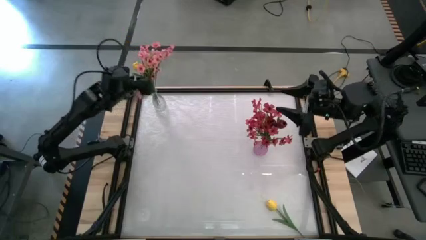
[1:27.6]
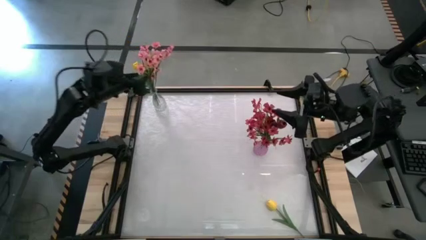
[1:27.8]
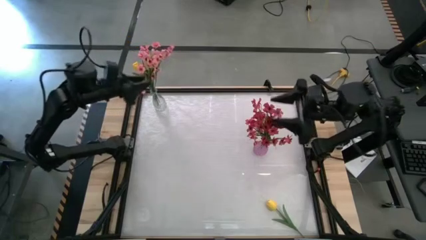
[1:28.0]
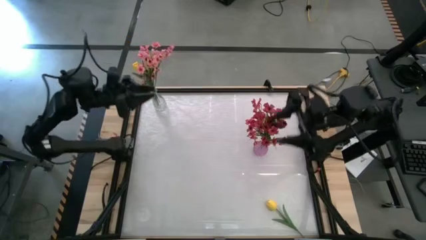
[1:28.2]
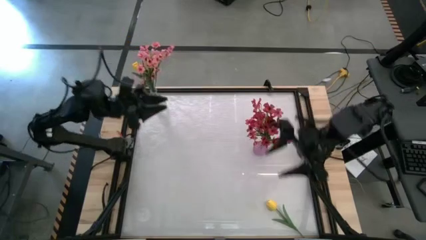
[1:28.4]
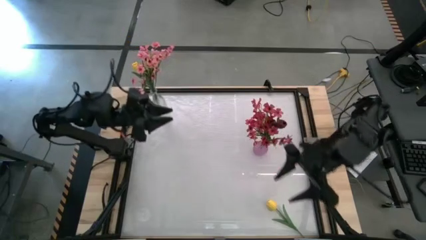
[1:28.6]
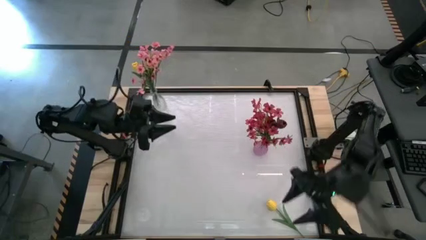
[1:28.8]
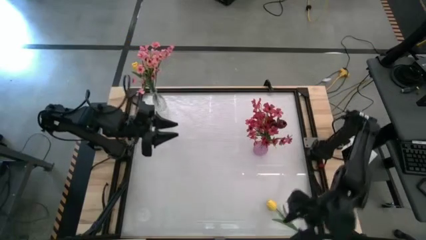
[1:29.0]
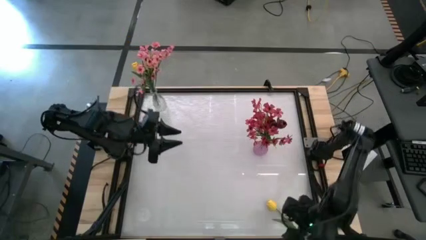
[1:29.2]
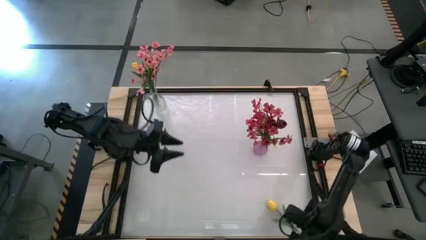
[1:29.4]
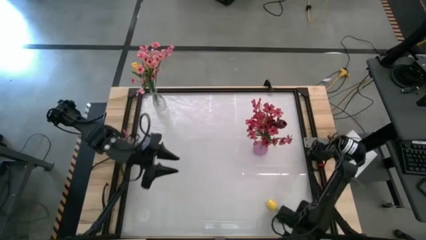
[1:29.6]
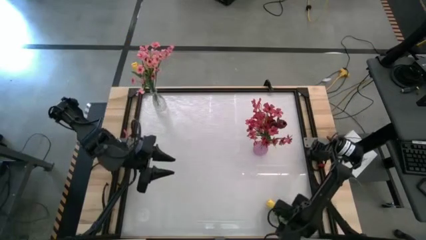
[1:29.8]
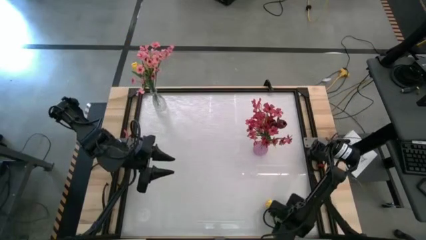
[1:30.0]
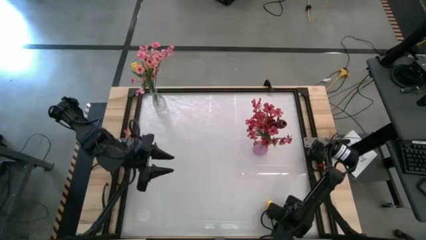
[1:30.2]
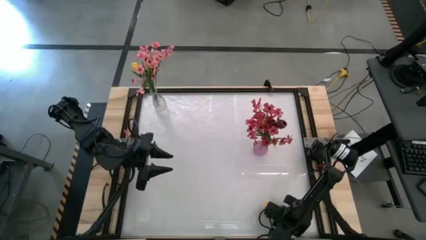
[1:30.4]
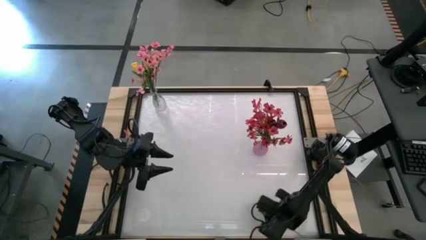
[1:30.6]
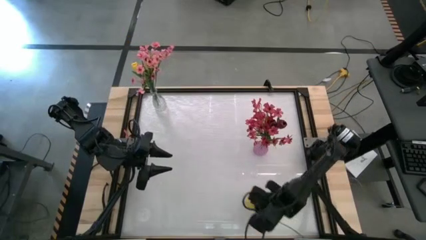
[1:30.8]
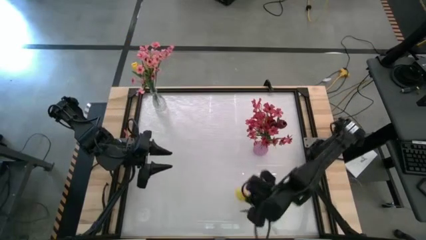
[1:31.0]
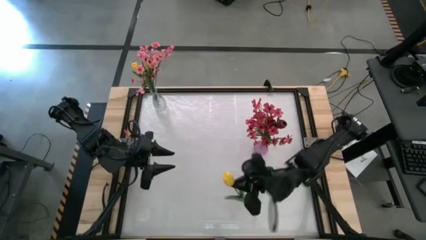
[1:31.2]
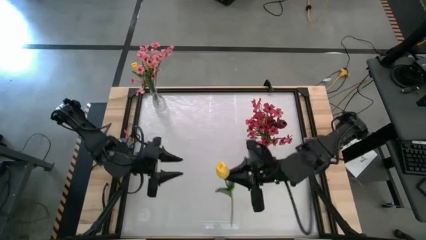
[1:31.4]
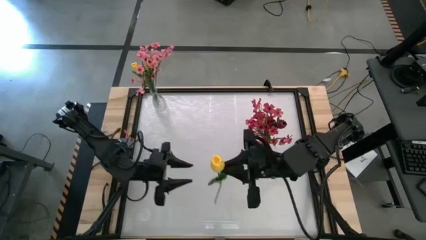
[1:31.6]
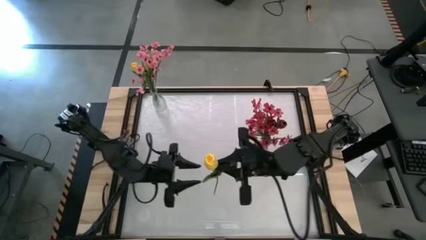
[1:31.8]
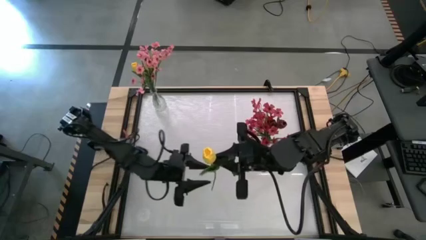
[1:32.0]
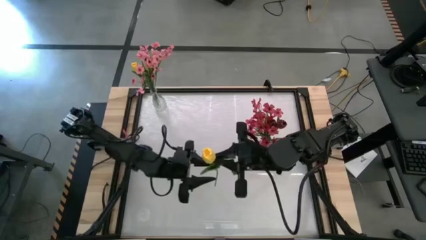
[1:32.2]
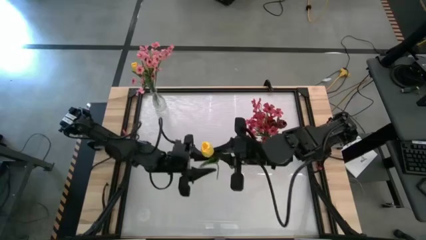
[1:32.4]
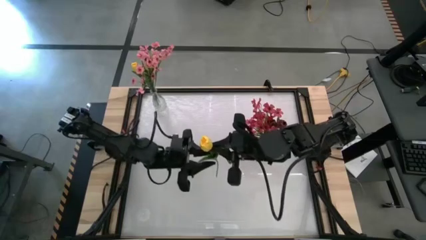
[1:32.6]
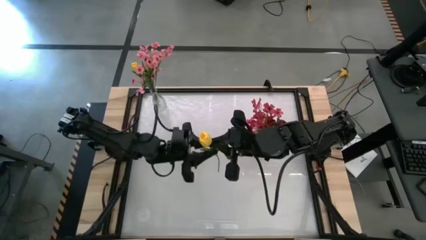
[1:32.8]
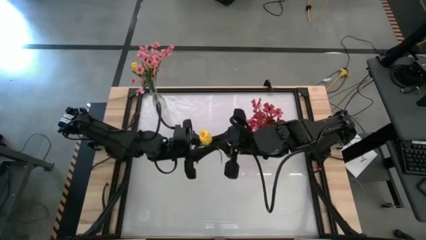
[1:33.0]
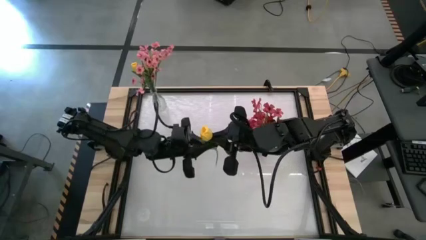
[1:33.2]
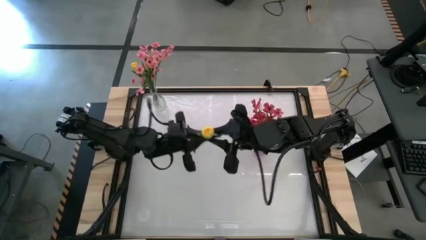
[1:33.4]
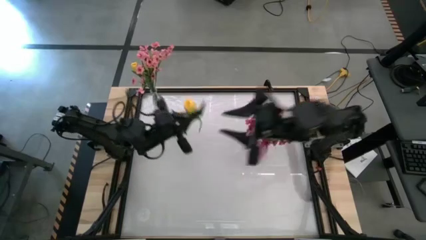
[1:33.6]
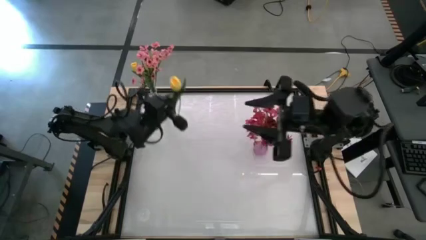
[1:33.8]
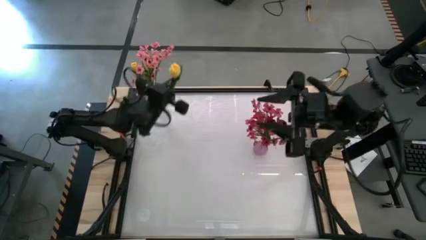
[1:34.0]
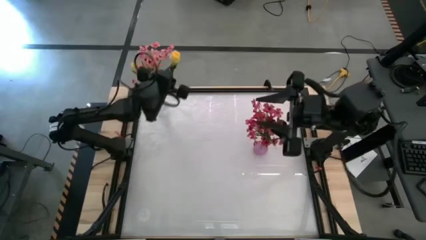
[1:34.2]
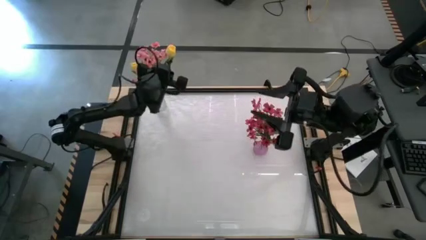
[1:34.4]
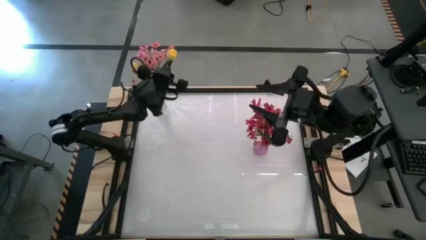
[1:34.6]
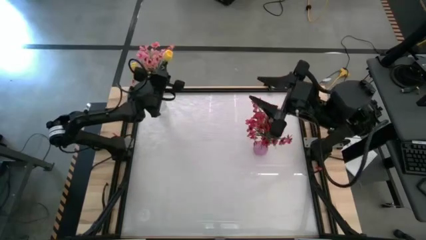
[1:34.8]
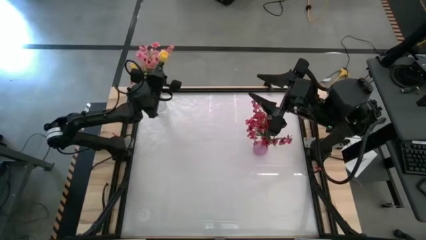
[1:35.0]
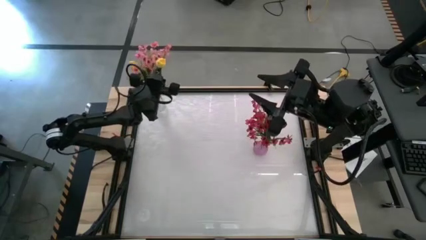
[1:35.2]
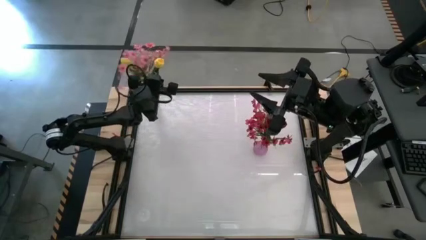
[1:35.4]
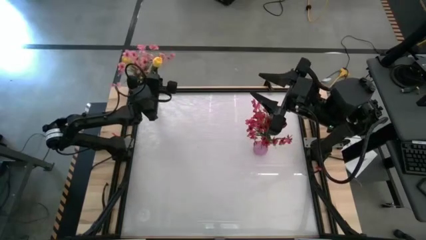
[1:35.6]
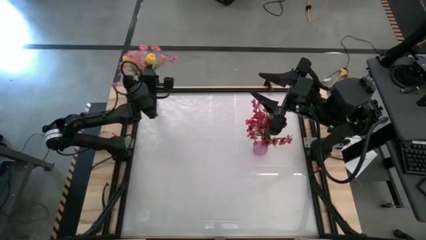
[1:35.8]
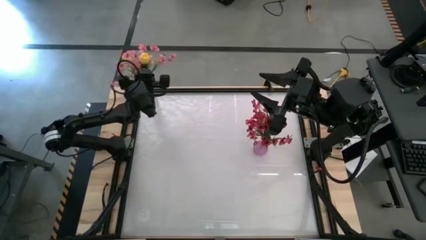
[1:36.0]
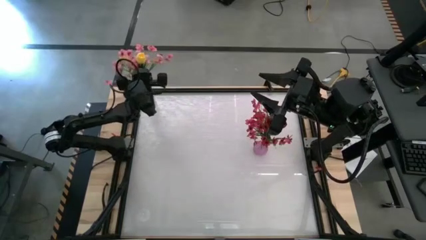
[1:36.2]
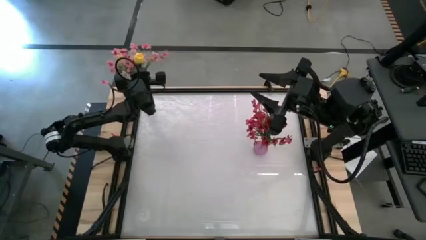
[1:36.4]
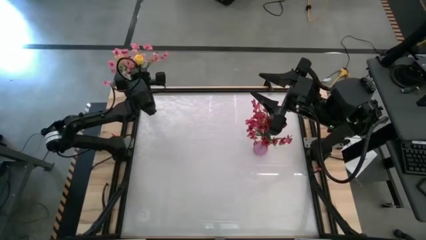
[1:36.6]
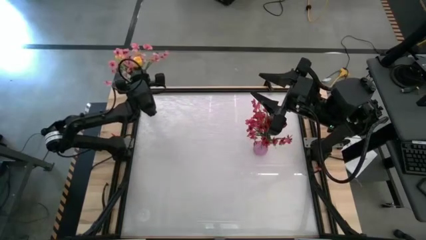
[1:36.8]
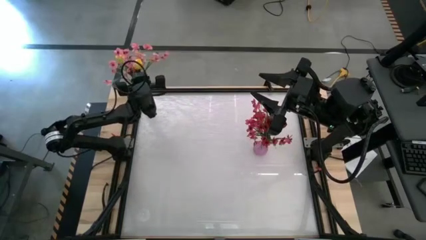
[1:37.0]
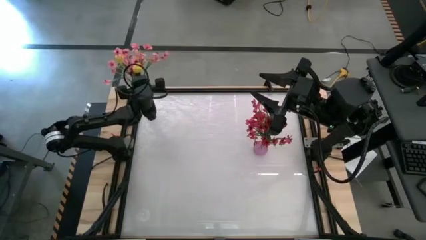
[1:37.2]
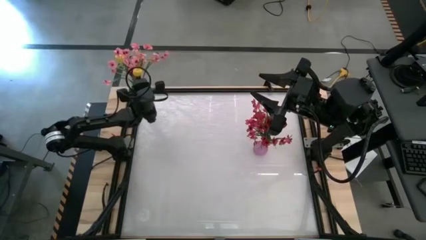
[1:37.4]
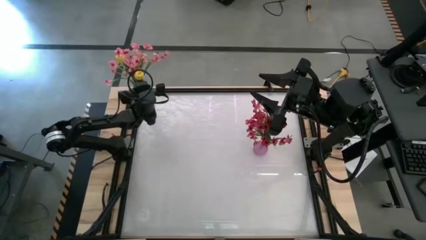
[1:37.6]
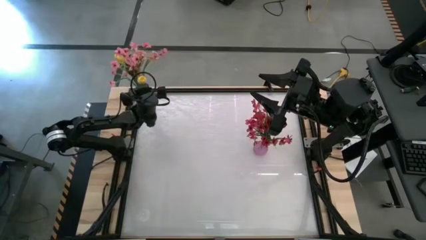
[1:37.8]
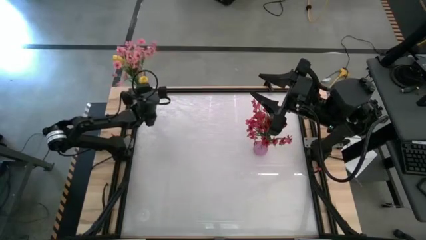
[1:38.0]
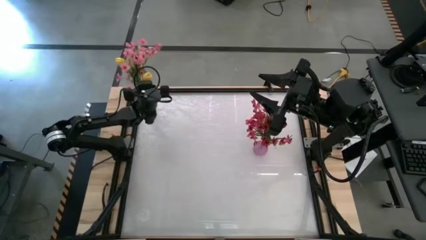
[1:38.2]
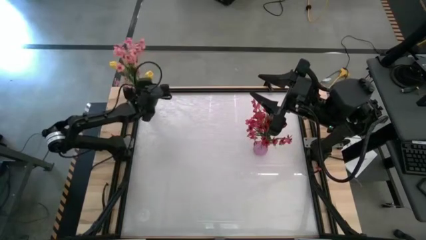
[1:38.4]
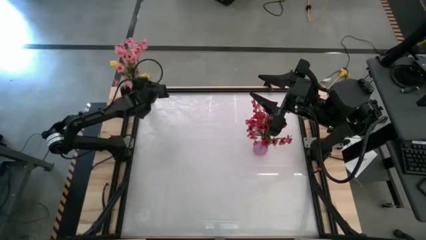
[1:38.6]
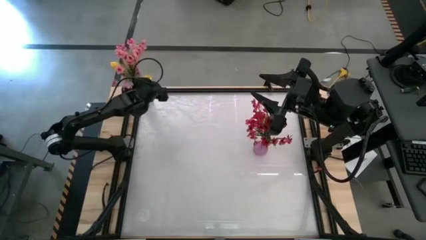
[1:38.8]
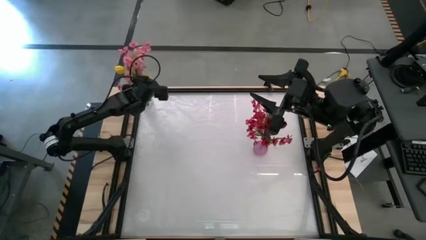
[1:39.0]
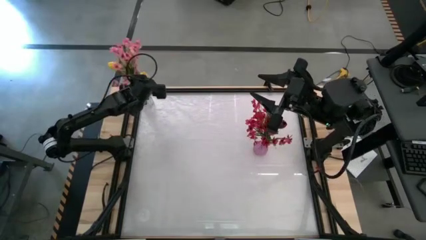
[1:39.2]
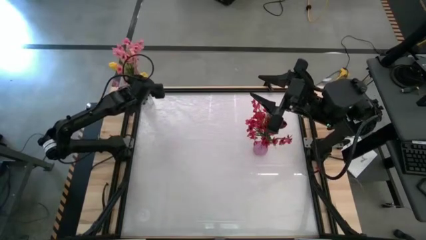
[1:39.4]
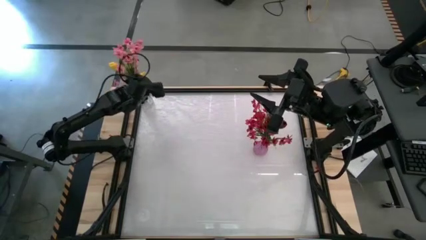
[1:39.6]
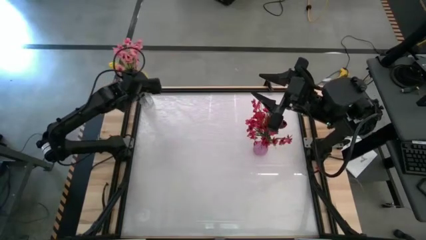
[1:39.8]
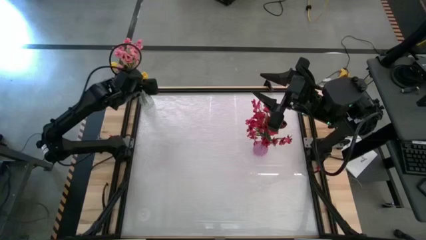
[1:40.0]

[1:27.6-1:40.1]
Task: Sort flowers into vase by color
Put the yellow tulip into the transparent vase
